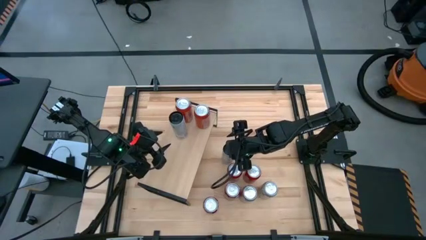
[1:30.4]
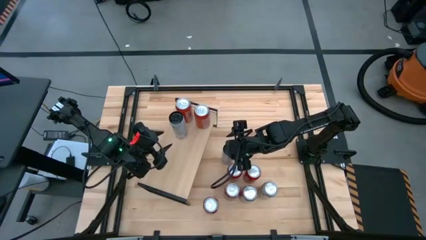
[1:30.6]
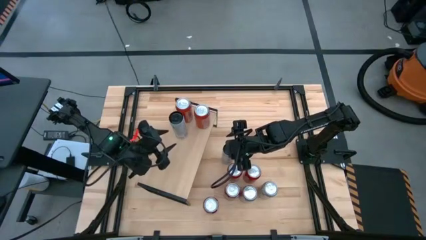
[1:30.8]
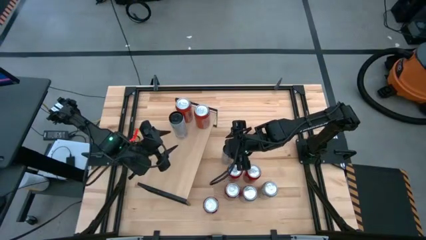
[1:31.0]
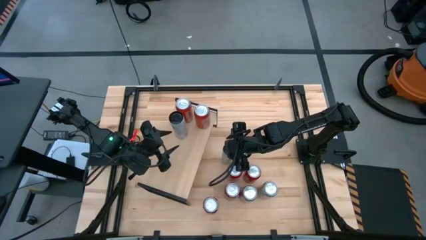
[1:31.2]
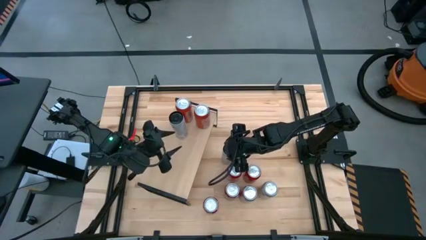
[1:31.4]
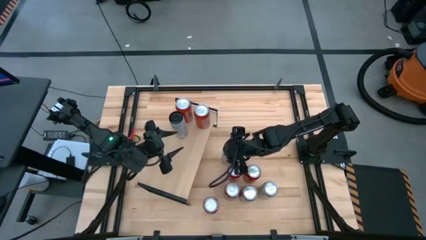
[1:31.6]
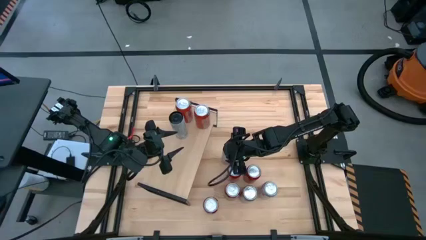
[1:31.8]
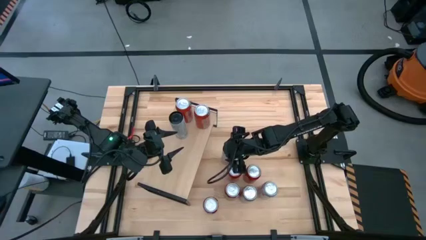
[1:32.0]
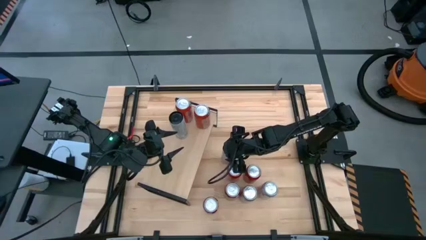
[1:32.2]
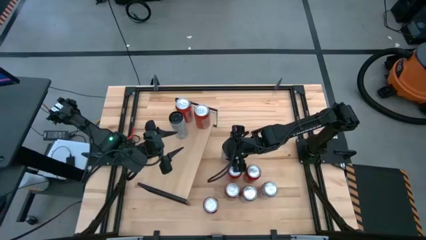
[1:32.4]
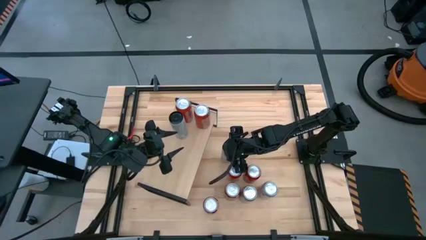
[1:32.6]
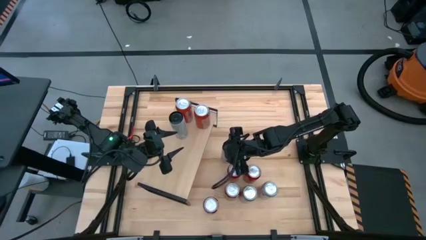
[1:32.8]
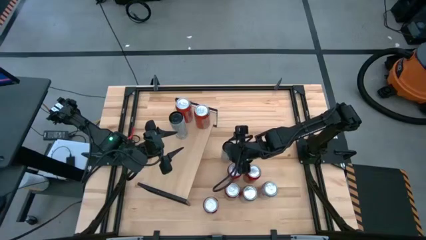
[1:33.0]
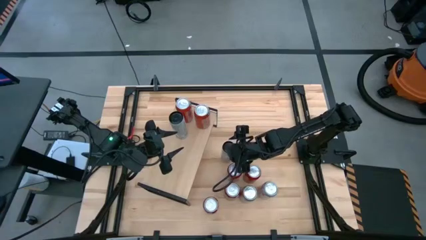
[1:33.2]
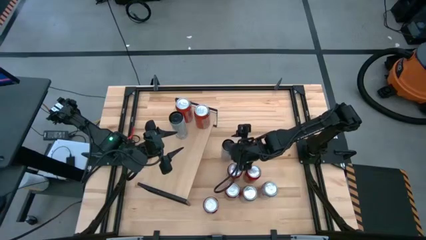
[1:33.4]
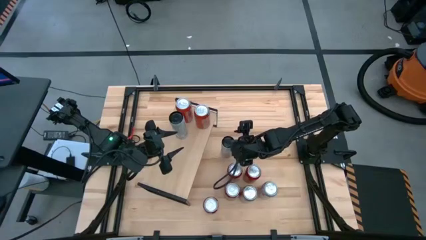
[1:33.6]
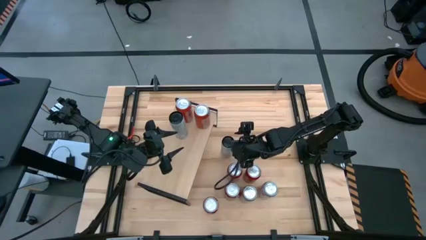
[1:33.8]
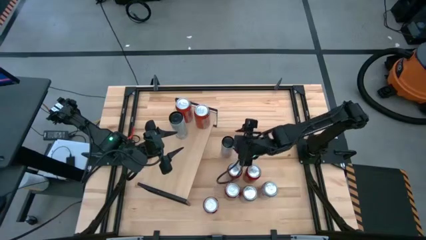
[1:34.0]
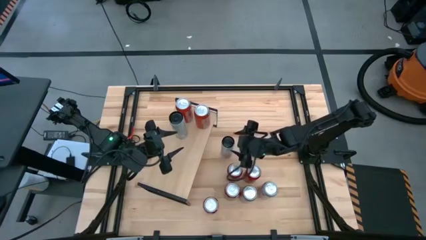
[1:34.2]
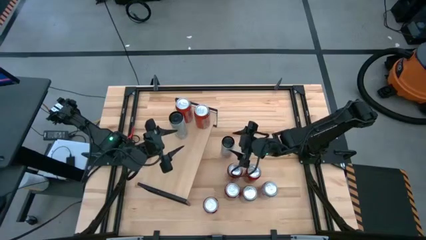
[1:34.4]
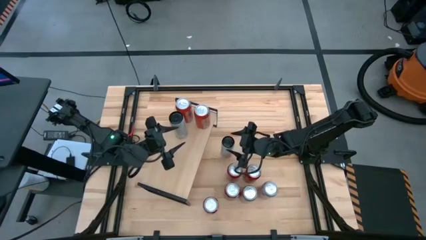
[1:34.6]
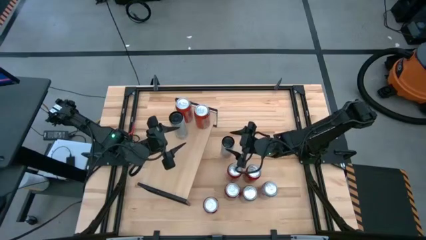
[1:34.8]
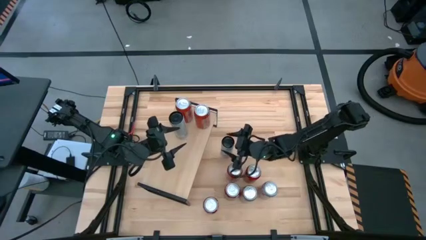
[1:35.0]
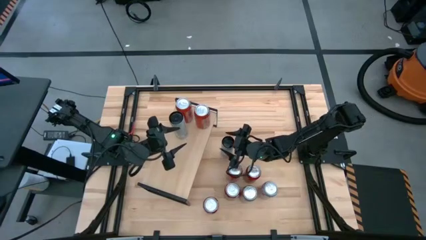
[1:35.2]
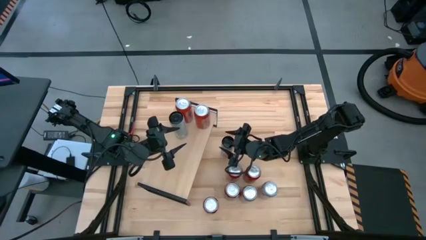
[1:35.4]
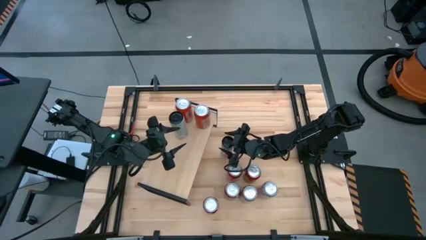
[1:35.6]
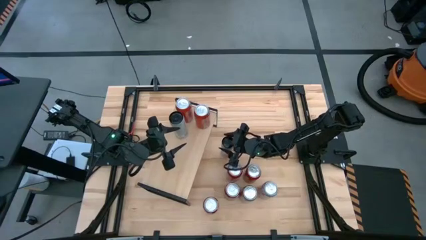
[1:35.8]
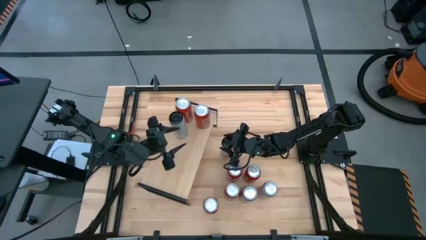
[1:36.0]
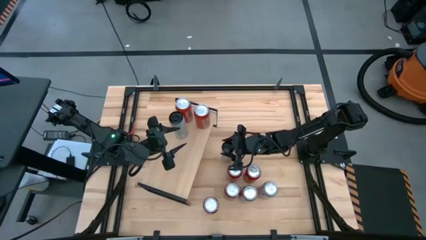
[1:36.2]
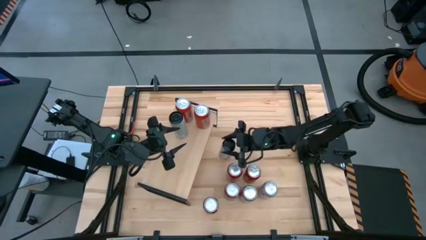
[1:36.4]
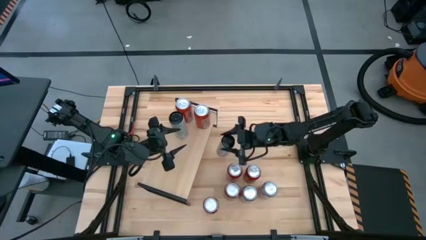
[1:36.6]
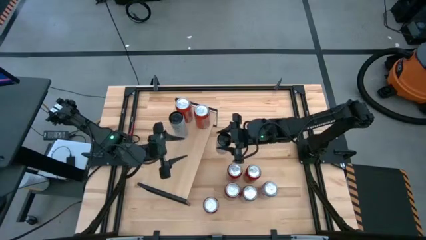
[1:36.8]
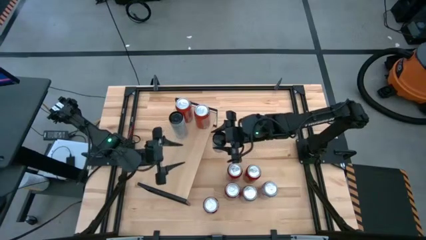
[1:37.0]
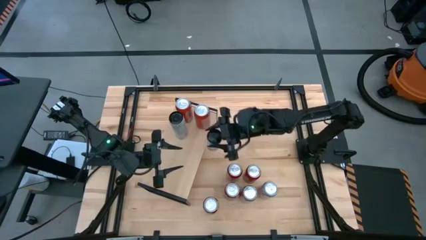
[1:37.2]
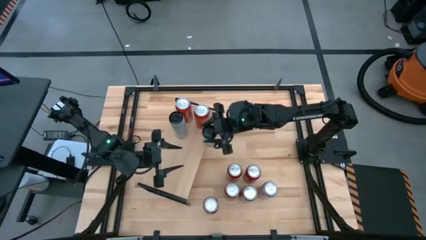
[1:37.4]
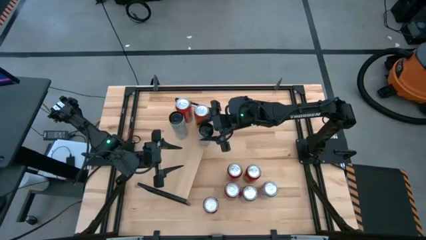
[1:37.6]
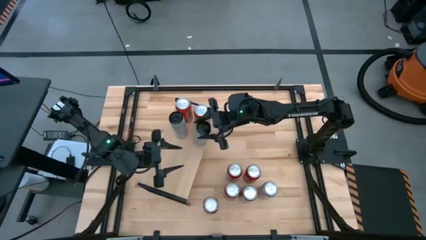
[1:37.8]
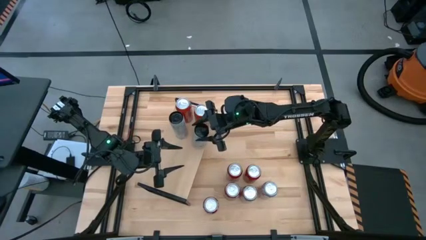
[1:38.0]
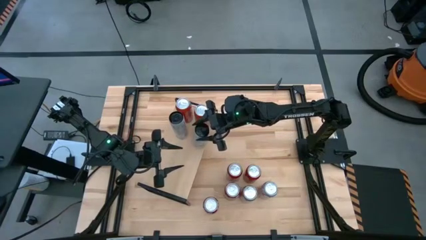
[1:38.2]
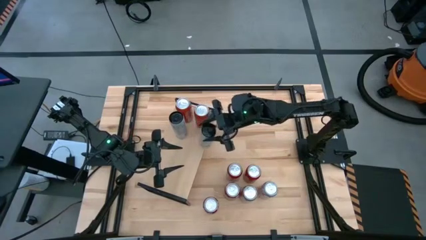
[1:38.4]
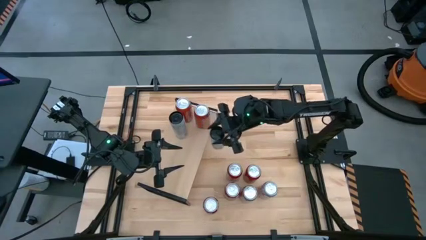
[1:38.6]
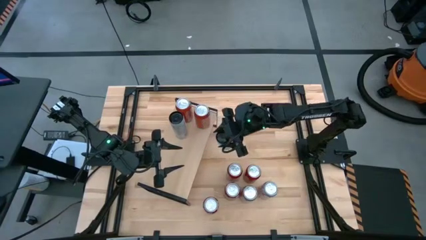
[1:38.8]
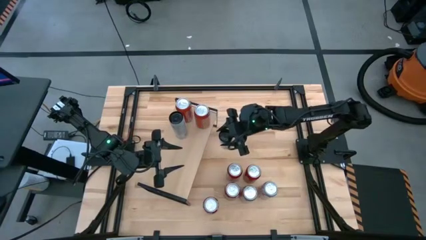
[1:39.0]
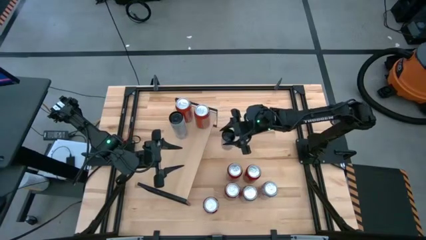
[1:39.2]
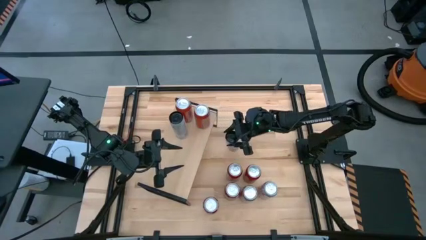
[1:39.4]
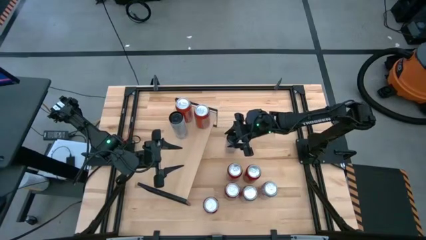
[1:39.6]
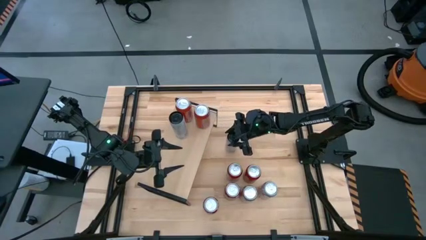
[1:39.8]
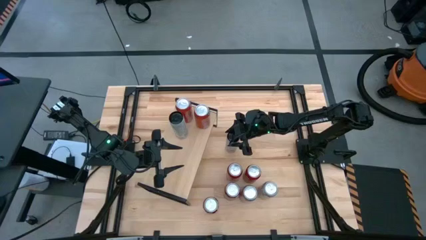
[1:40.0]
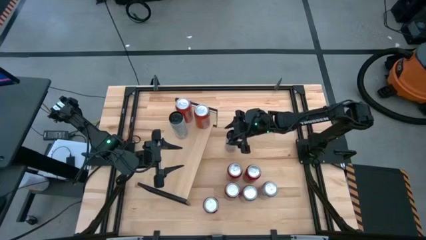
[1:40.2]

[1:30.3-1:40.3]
Task: Place canned beverage on shelf
Put the white soda can on the shelf

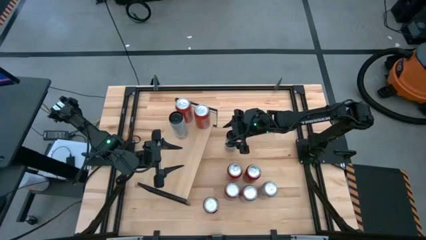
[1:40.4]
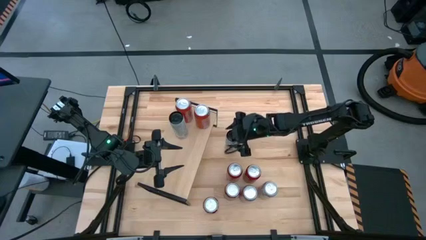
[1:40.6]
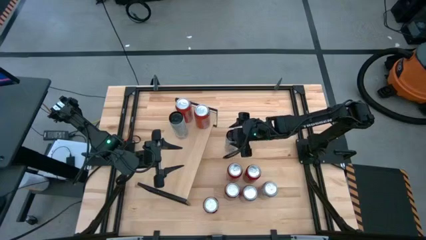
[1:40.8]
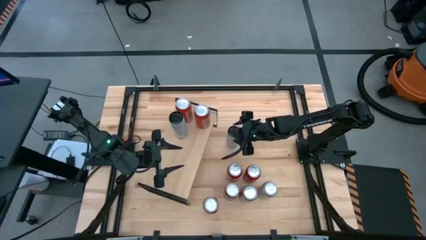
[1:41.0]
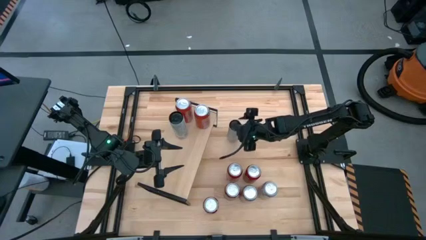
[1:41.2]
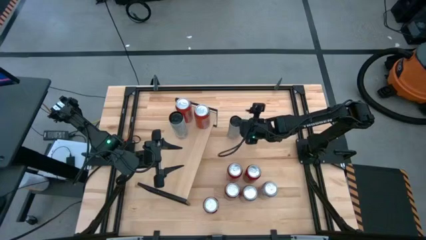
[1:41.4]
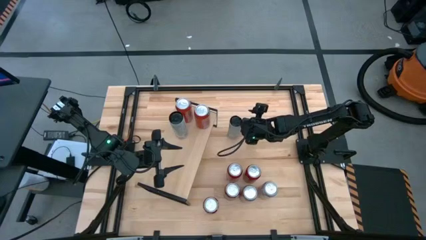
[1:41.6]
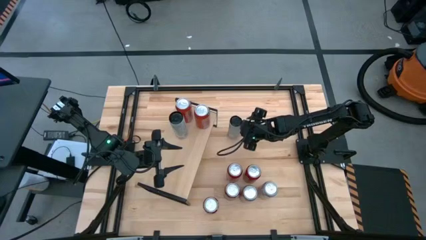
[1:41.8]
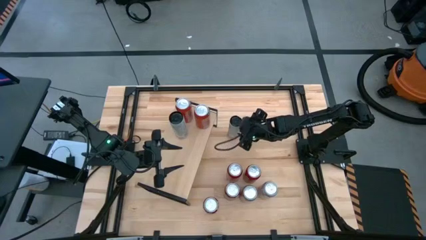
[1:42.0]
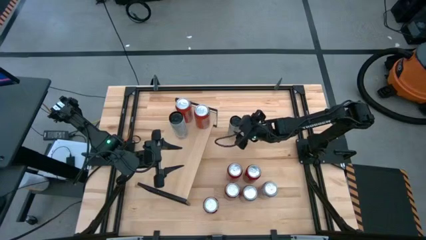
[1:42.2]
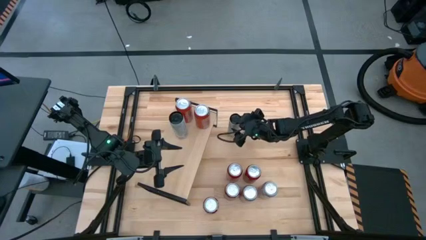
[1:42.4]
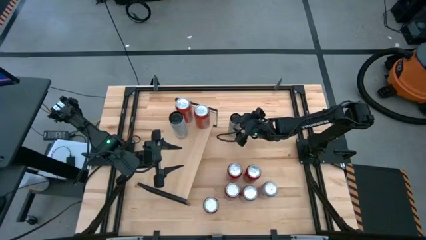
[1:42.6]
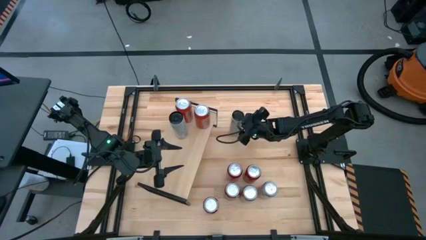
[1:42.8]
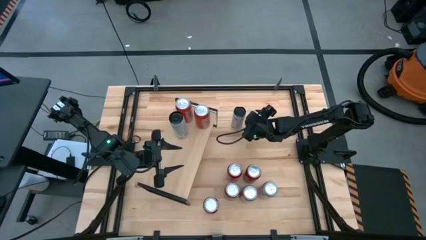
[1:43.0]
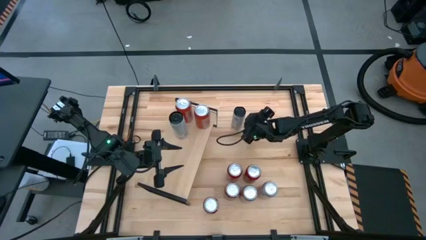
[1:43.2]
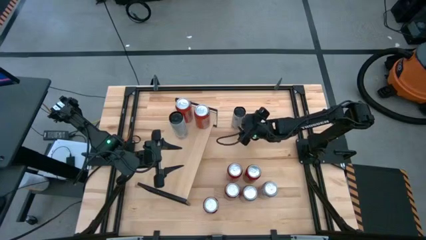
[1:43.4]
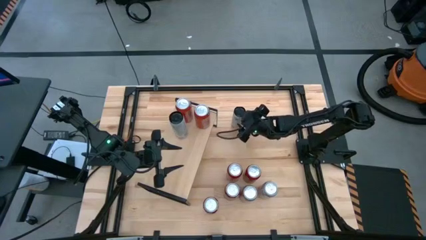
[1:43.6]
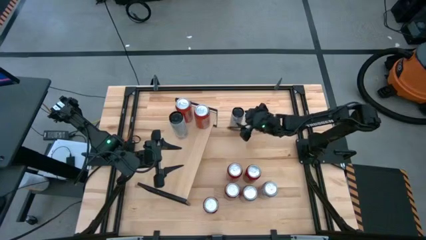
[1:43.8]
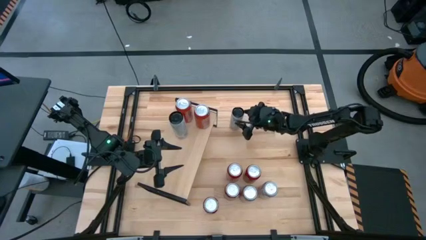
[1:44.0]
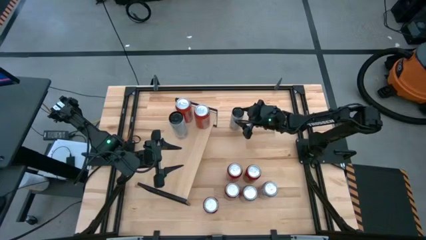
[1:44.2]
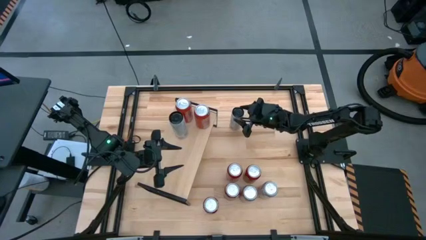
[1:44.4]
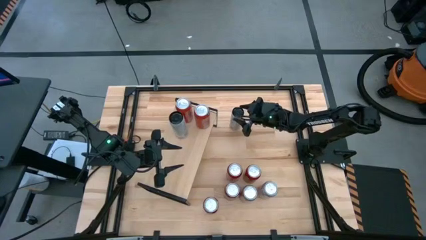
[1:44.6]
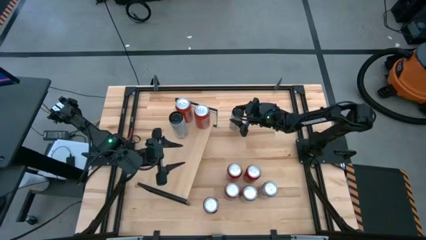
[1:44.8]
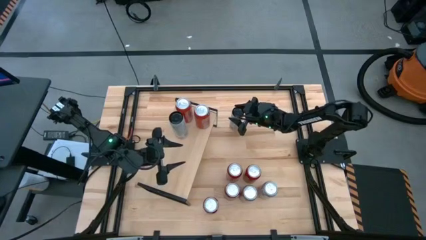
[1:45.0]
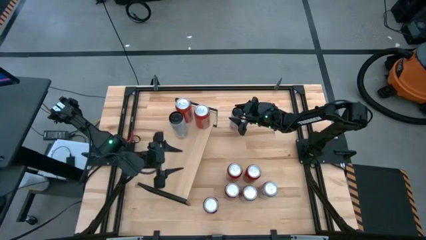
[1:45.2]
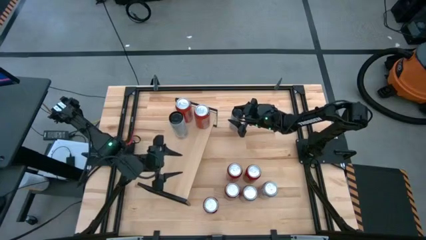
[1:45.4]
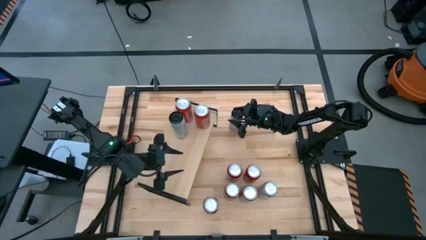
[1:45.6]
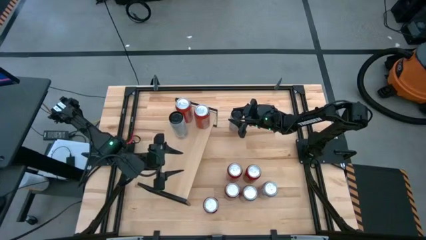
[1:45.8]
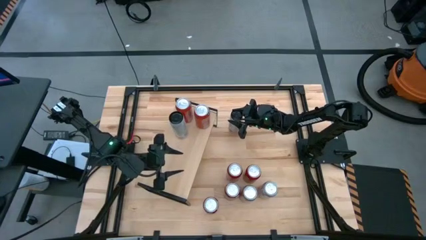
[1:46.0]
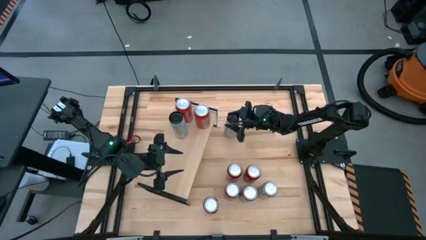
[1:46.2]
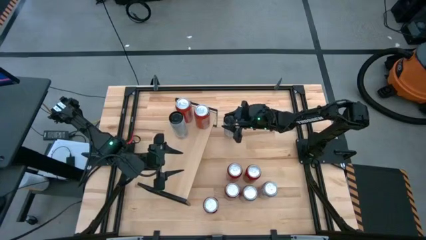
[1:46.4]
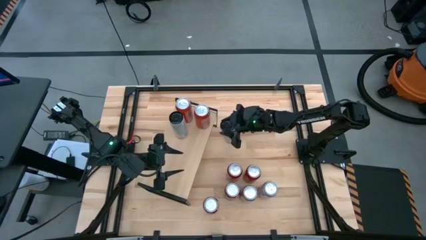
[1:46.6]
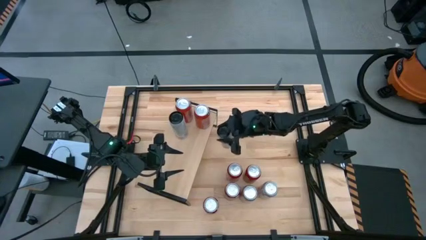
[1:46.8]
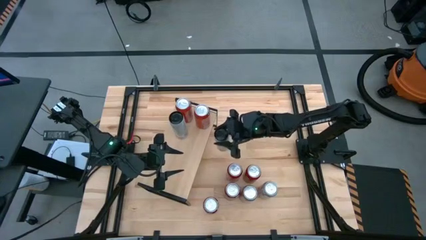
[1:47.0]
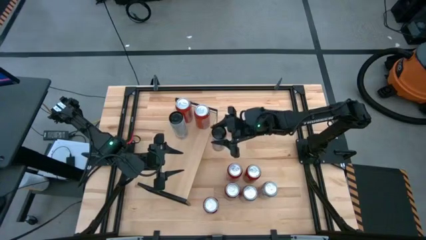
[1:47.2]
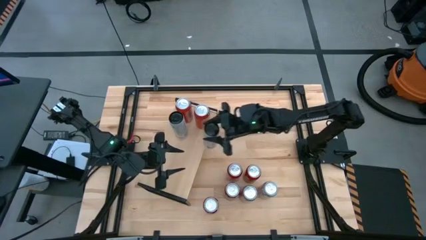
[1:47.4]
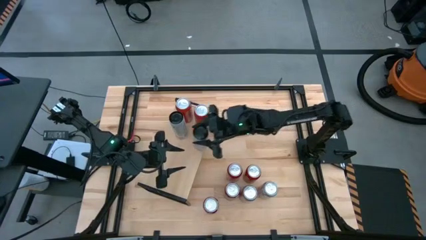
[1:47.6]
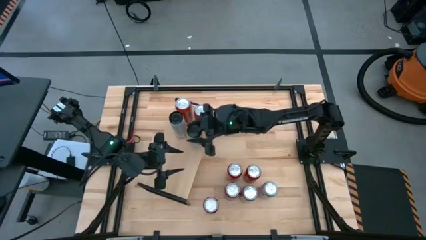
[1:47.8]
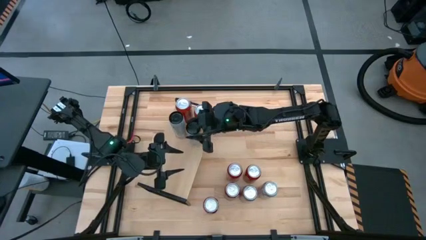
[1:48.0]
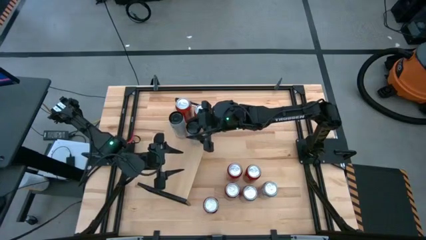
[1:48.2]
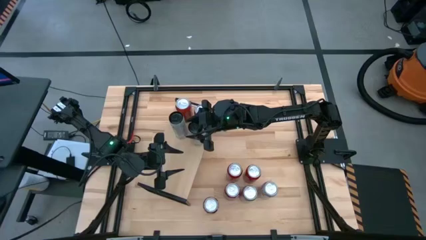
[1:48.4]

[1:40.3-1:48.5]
Put the white soda can on the shelf
